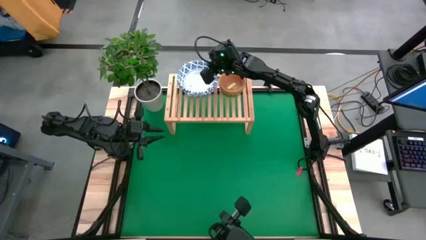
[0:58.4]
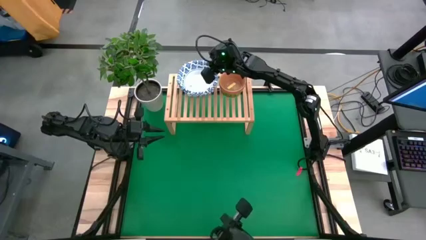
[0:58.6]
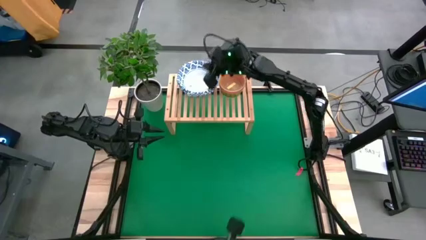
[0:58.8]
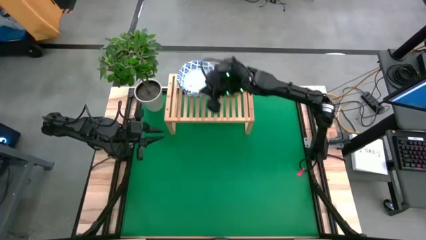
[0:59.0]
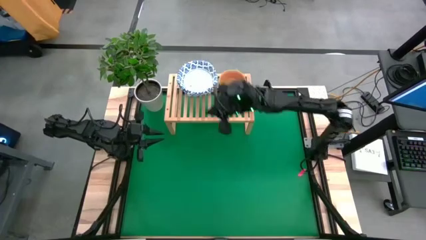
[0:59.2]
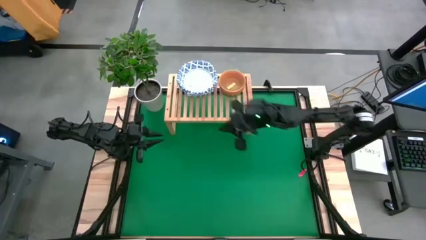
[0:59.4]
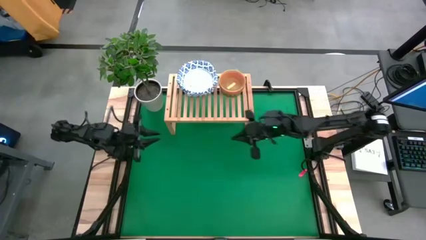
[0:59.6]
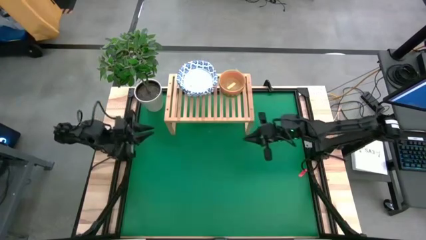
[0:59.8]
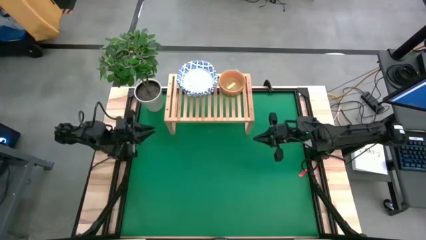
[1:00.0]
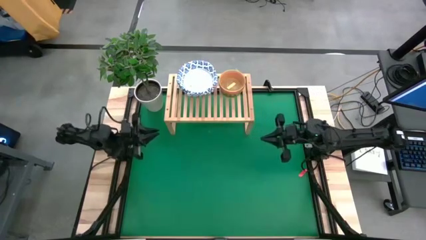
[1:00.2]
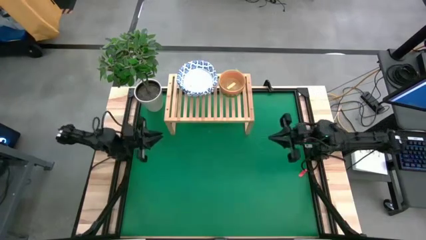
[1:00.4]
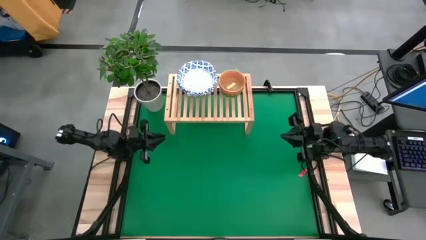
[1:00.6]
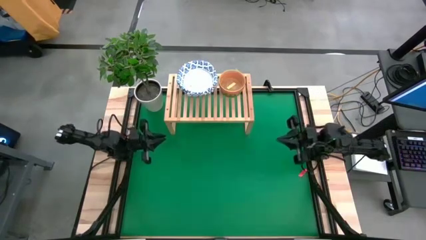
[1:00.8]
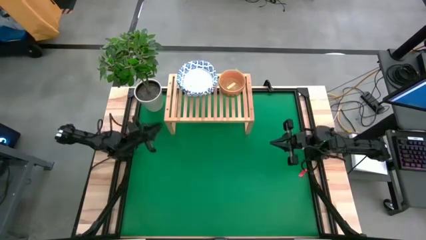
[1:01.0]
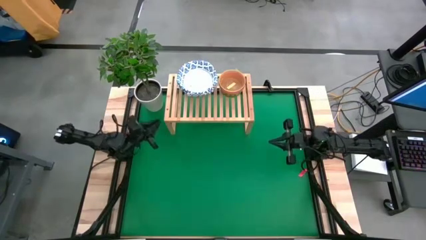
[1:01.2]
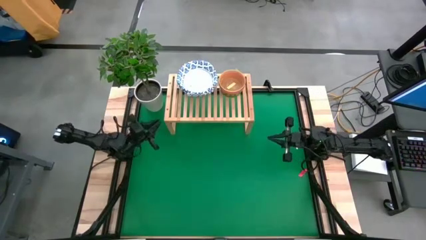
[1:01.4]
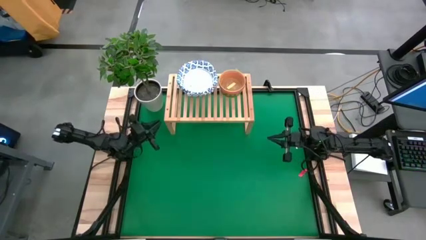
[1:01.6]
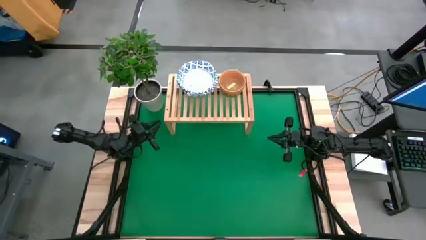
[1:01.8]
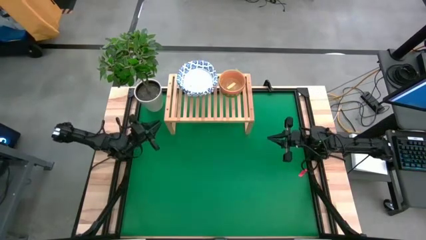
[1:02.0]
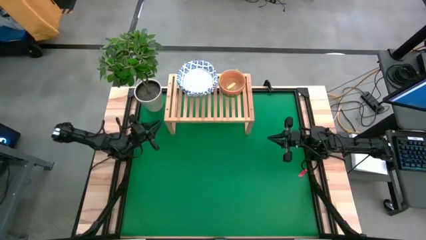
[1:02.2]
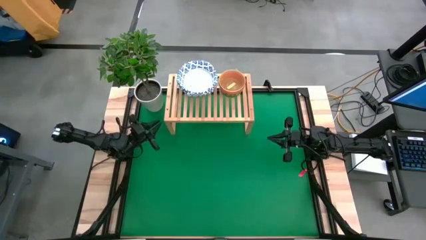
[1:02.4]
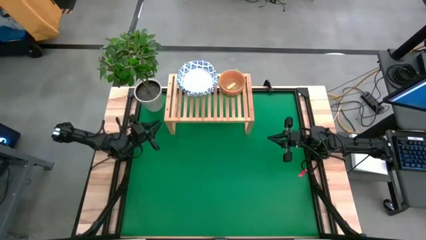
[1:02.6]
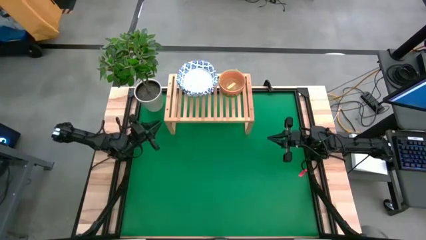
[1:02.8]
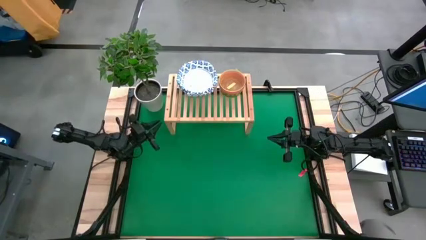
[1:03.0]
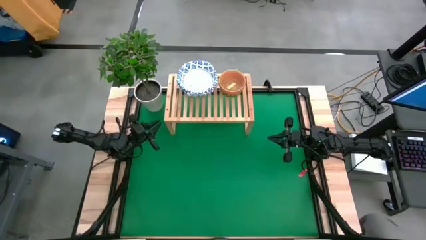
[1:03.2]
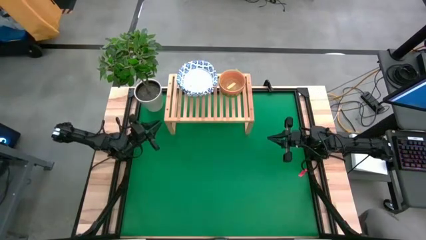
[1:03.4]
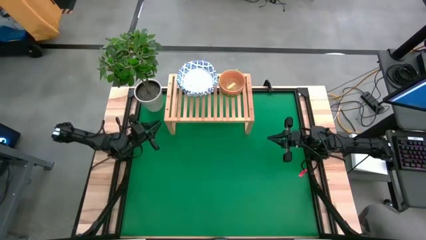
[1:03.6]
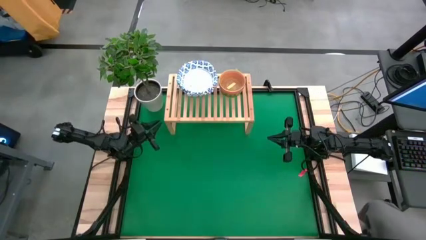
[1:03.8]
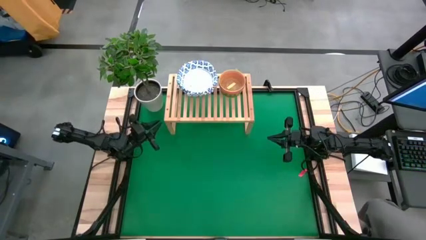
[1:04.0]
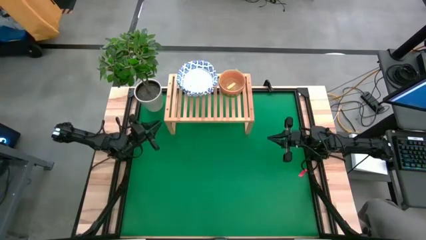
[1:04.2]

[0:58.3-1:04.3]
Task: Place and stack bowls onto a shelf
Return to Home Position

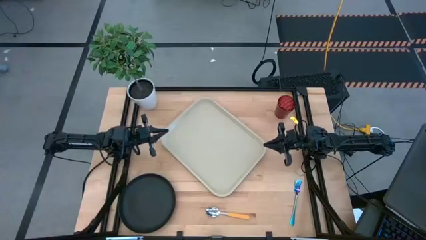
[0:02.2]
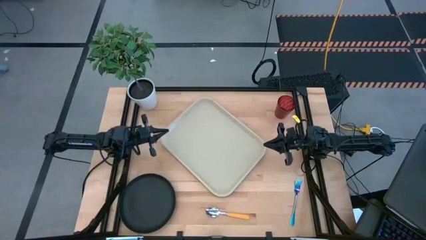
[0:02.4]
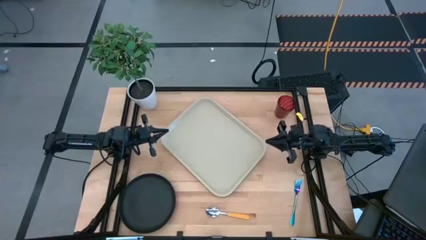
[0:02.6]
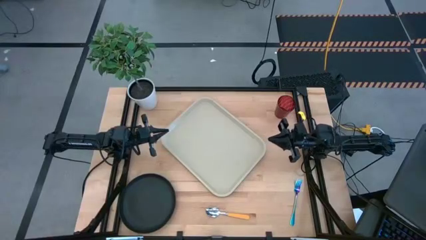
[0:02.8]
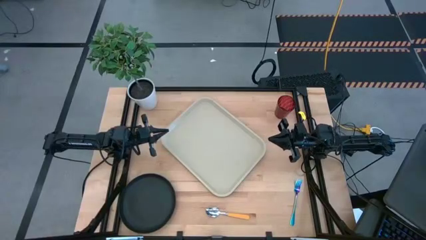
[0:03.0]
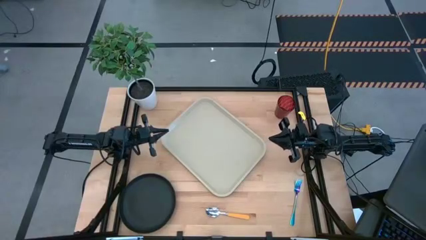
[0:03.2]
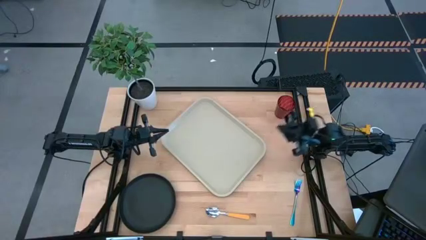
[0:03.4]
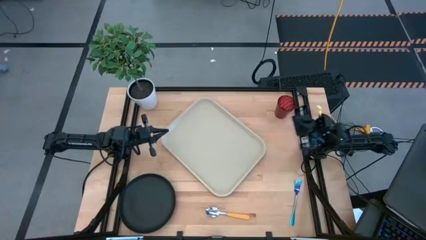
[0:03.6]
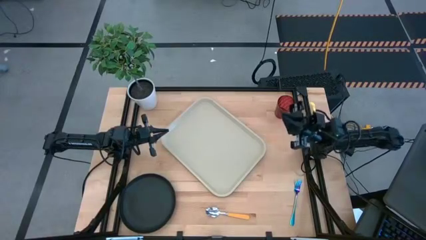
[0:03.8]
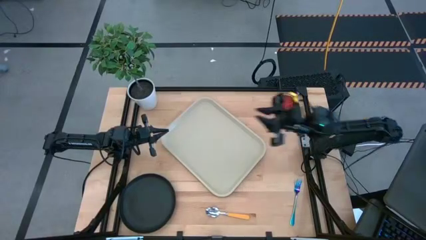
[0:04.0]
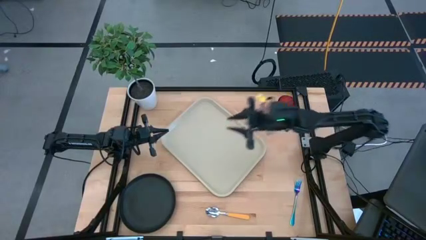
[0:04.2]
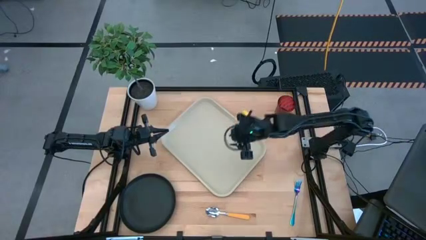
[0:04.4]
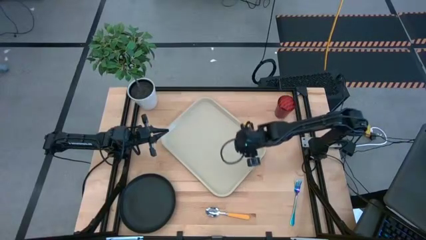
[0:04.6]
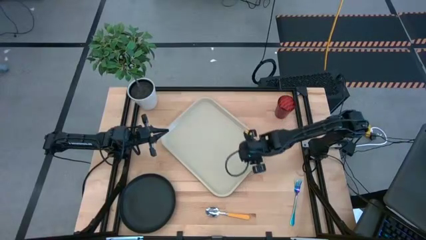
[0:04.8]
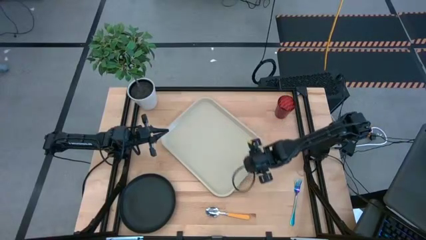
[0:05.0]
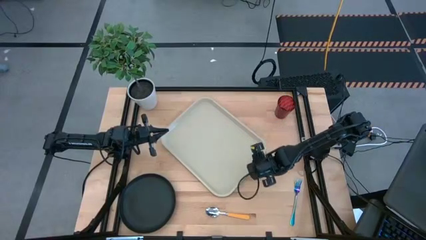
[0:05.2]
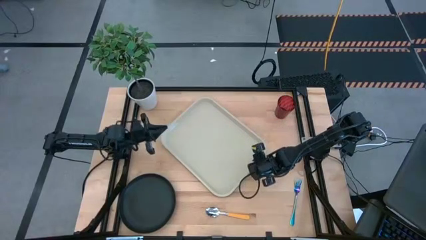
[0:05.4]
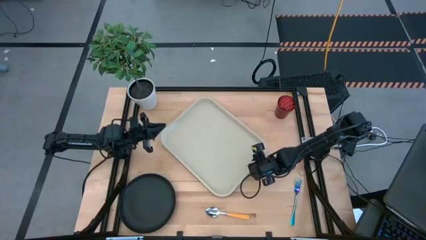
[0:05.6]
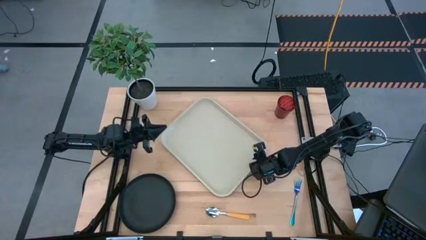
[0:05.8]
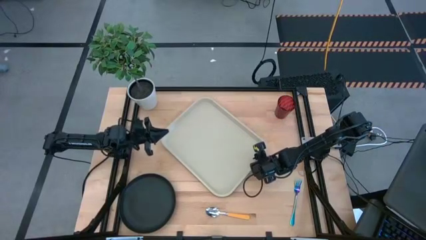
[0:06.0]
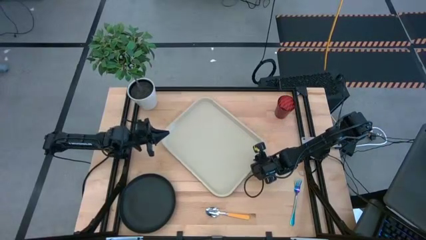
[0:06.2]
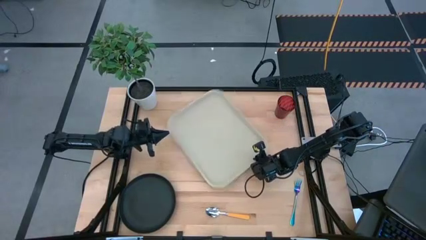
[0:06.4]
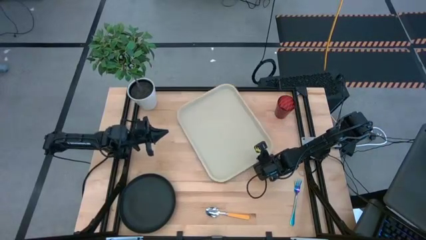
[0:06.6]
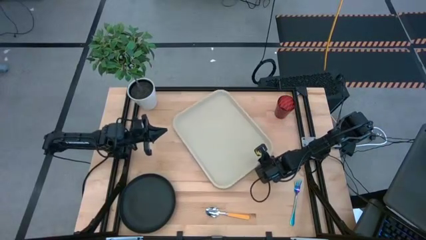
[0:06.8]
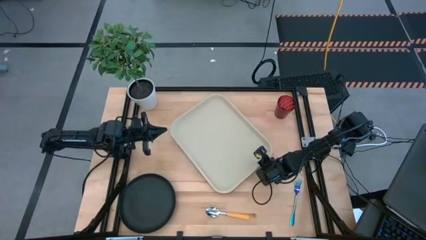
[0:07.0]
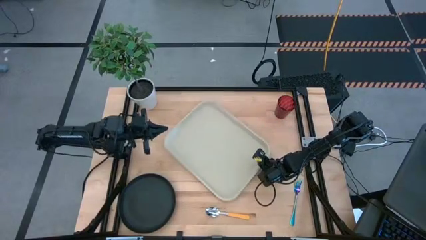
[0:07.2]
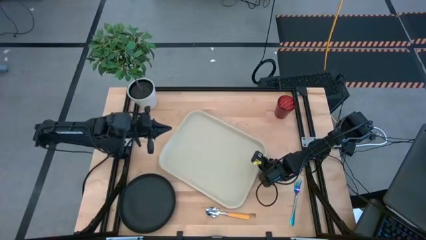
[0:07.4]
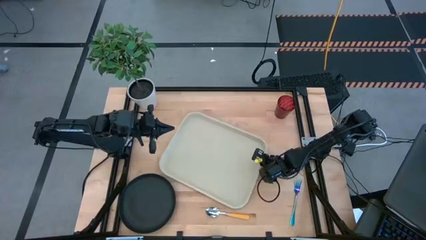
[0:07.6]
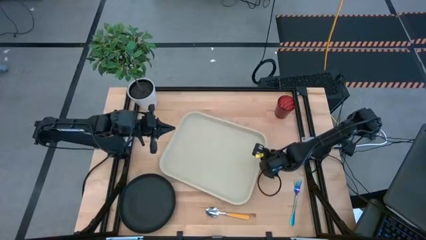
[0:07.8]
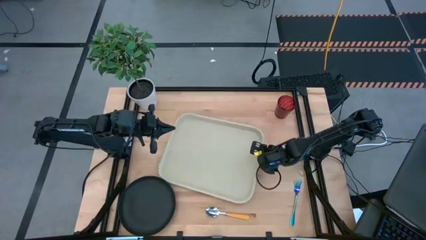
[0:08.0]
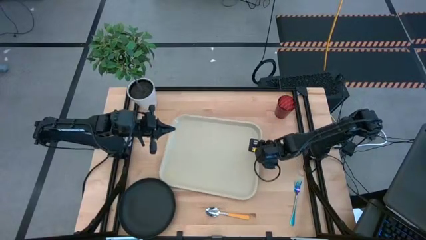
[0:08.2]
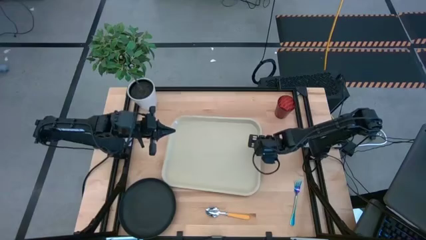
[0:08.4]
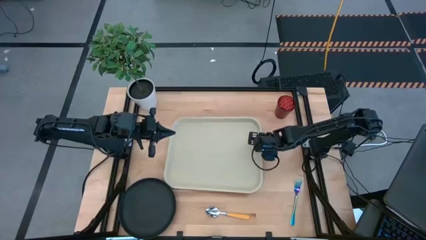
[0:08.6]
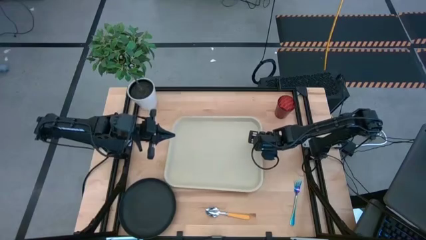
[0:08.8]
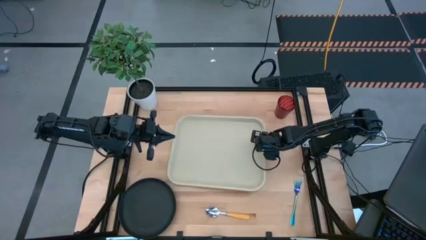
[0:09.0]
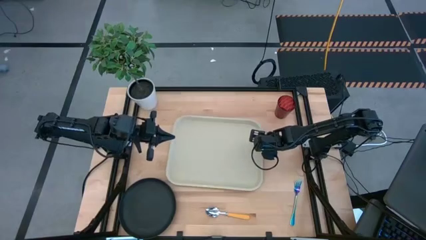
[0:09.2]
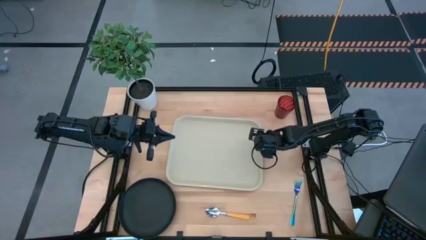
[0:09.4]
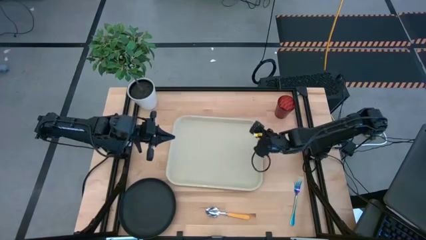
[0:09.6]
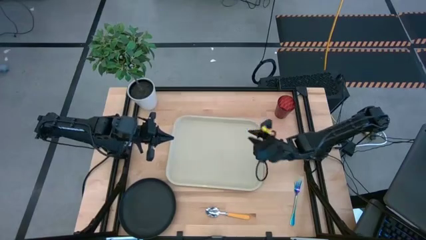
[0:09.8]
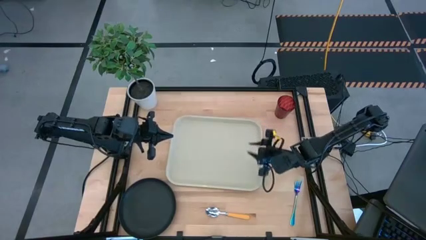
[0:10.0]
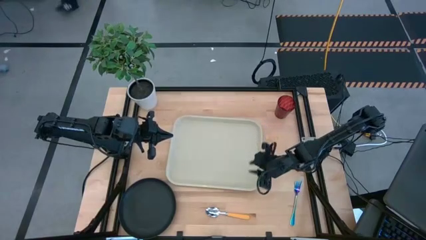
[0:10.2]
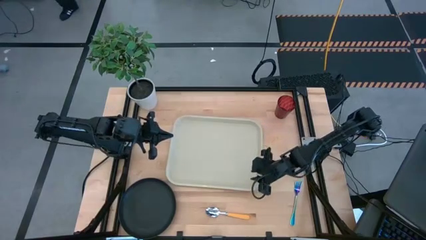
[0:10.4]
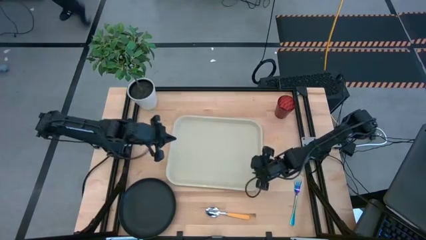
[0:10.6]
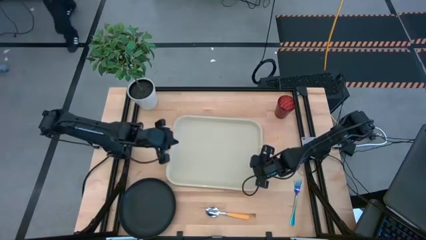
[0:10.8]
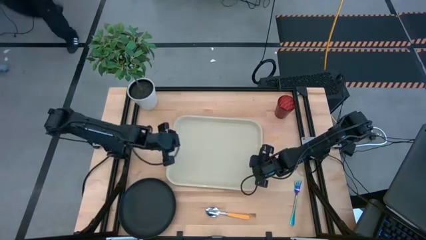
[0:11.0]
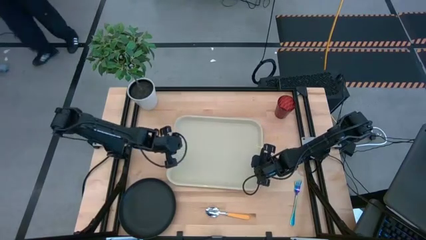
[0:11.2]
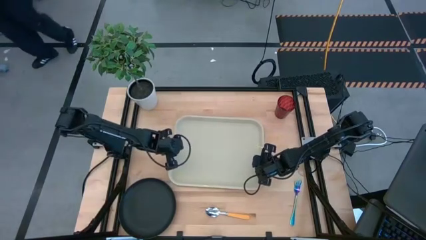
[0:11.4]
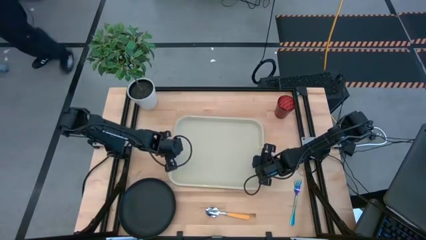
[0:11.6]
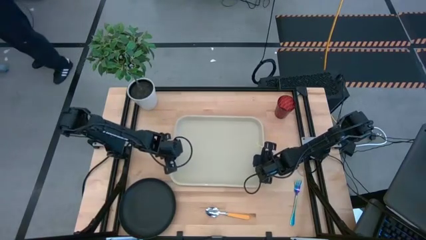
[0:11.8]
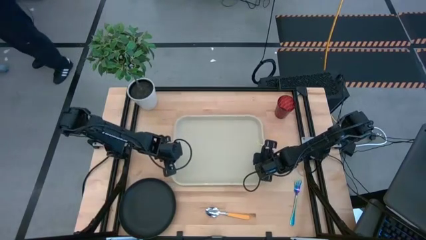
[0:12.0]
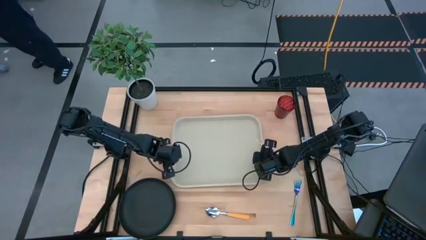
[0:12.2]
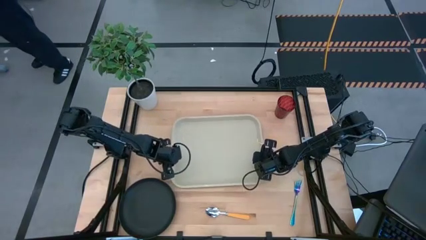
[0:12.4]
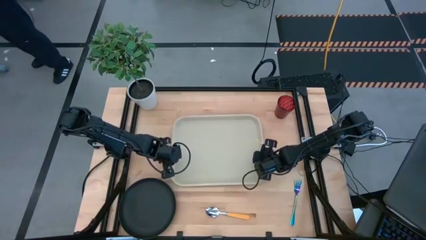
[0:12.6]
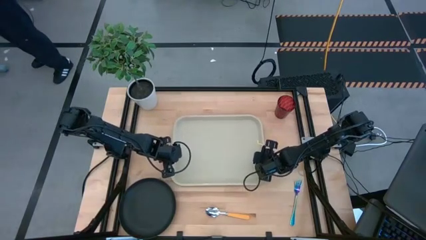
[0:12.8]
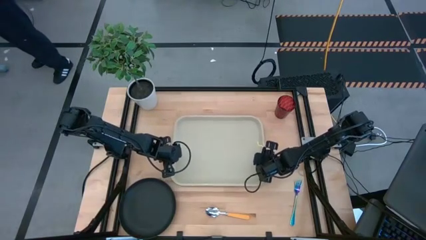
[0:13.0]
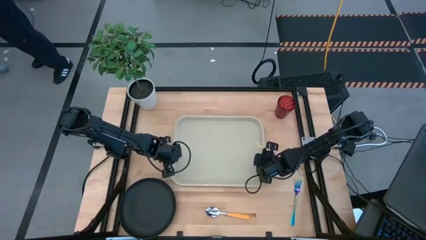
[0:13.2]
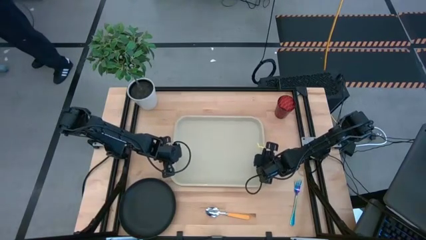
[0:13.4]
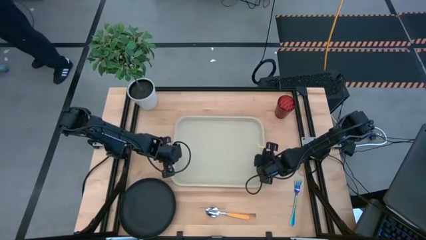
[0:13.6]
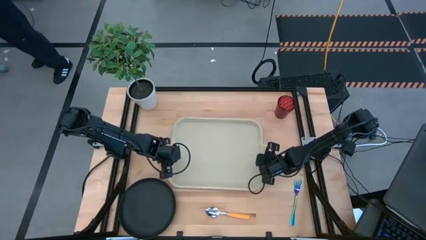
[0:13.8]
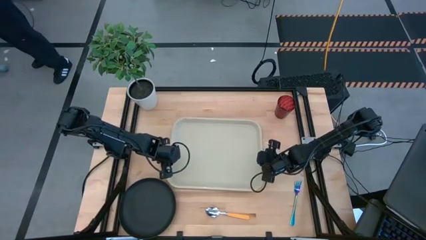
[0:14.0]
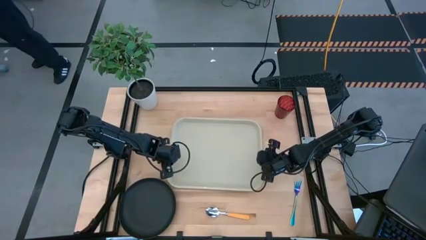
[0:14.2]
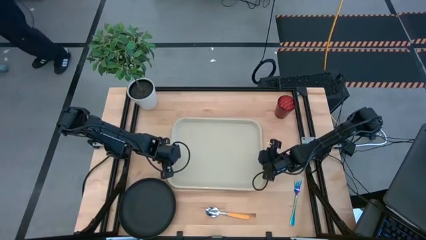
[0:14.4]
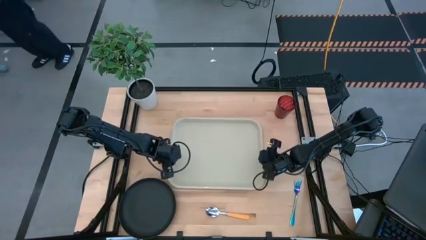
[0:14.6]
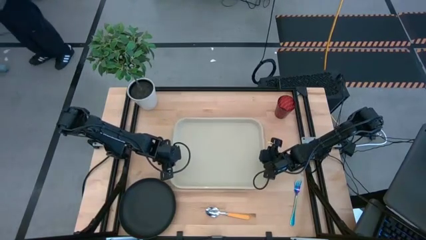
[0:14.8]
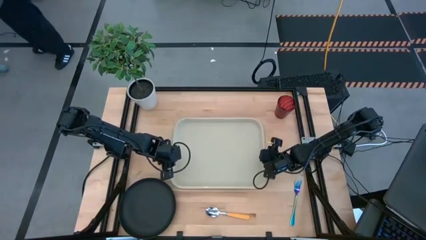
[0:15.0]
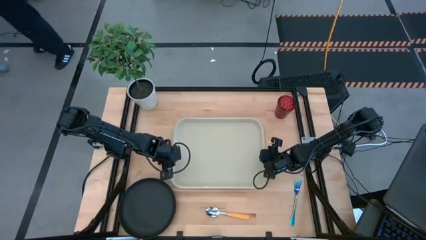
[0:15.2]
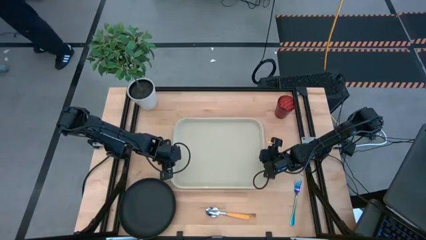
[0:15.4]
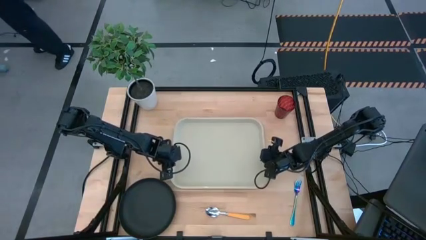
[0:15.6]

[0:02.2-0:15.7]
Task: Pick and place plate/cup/fork/spoon on tray
Adjust the gray tray
